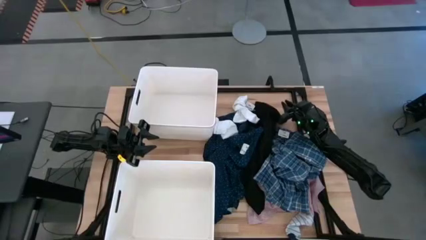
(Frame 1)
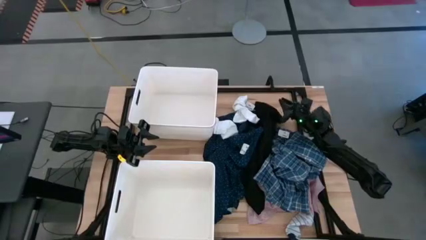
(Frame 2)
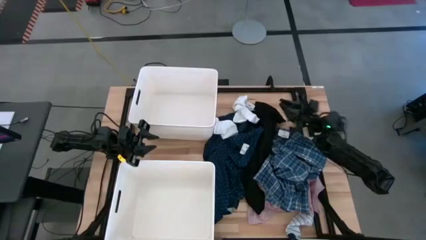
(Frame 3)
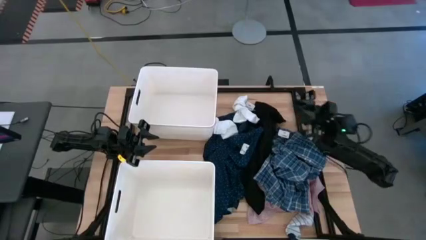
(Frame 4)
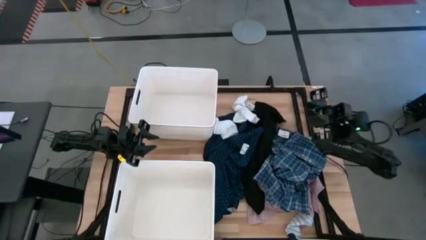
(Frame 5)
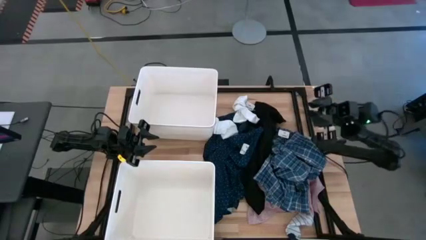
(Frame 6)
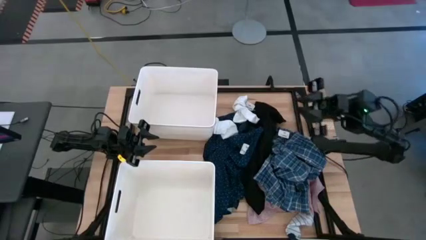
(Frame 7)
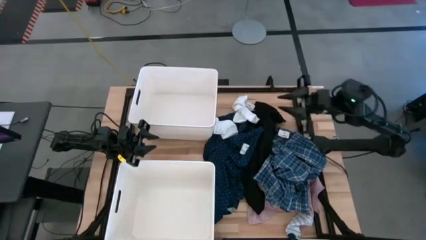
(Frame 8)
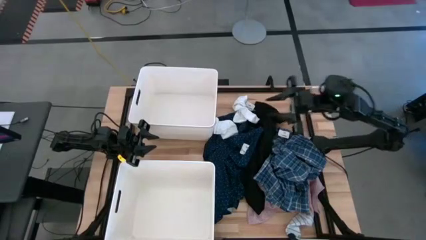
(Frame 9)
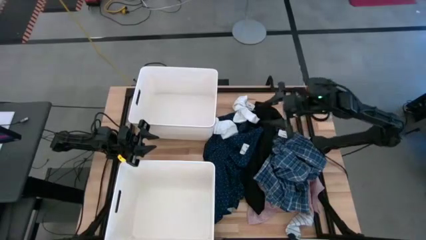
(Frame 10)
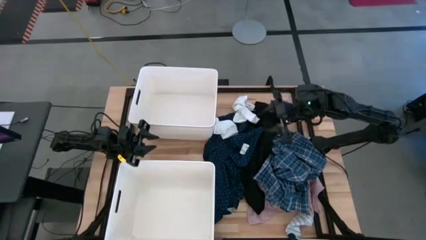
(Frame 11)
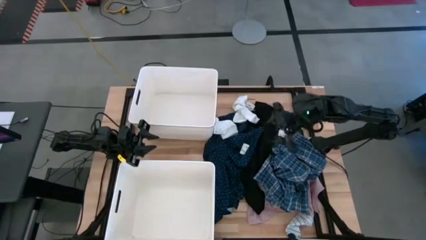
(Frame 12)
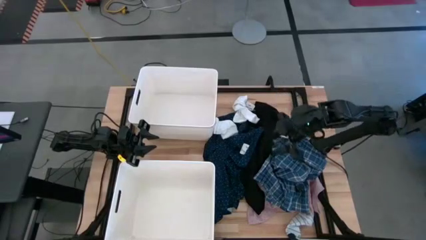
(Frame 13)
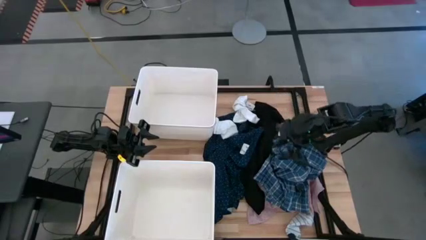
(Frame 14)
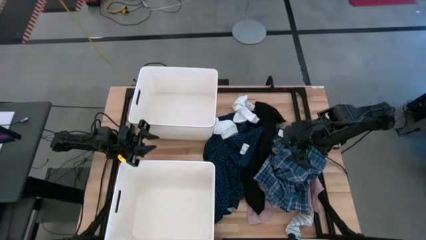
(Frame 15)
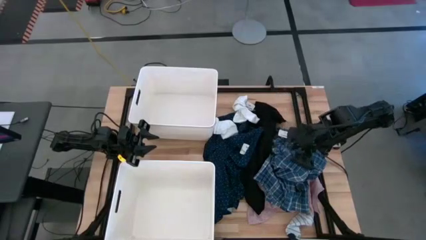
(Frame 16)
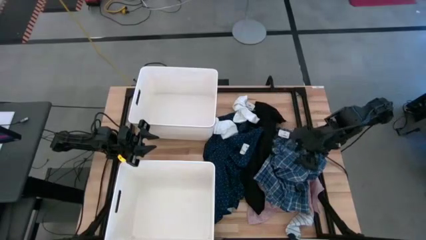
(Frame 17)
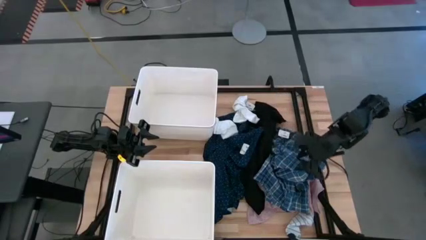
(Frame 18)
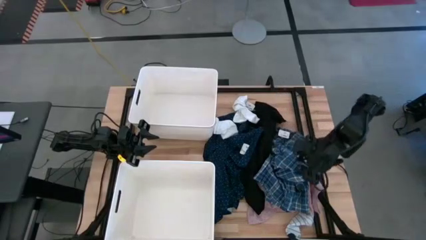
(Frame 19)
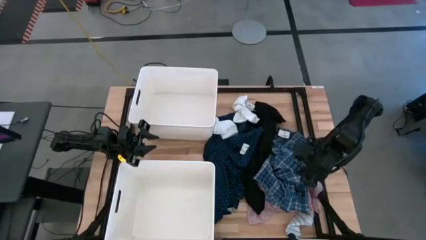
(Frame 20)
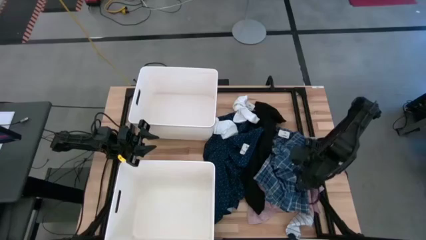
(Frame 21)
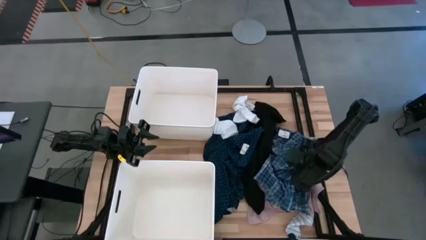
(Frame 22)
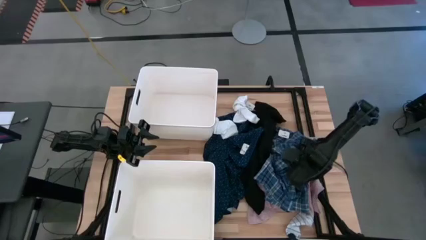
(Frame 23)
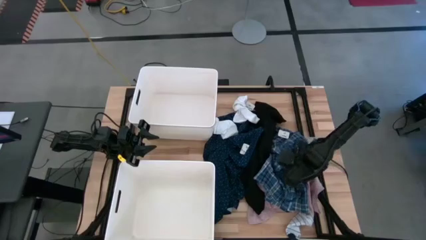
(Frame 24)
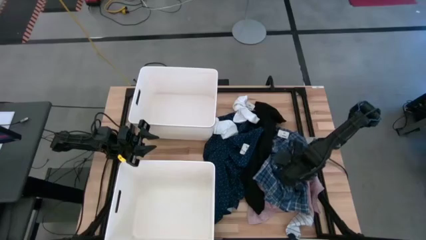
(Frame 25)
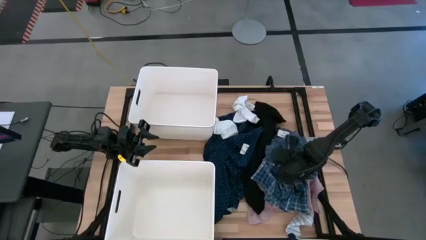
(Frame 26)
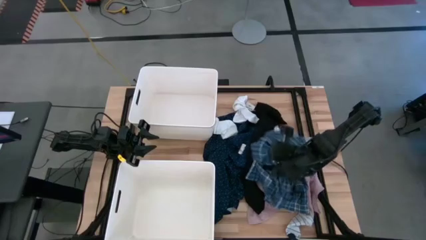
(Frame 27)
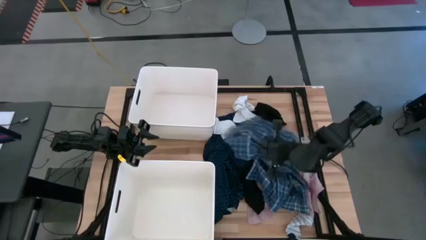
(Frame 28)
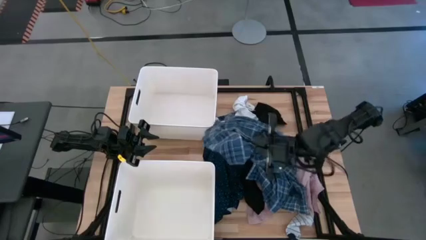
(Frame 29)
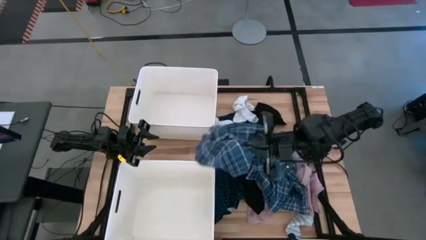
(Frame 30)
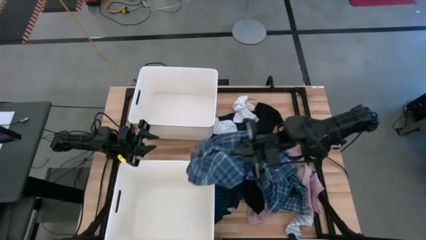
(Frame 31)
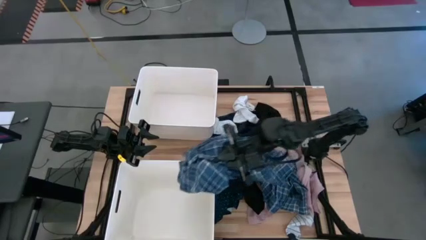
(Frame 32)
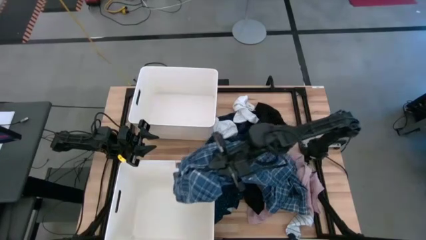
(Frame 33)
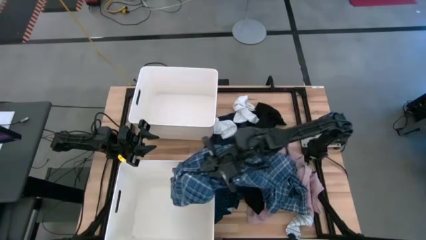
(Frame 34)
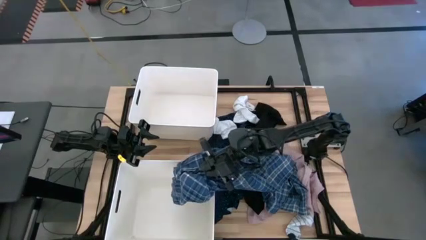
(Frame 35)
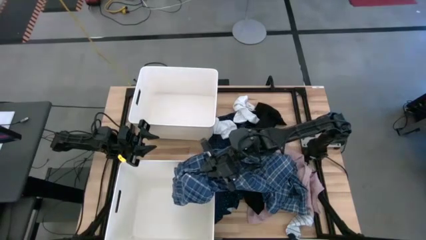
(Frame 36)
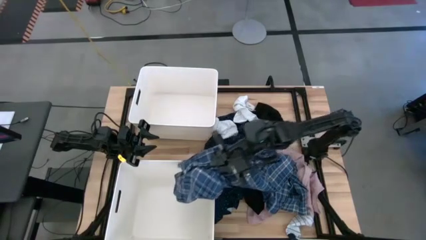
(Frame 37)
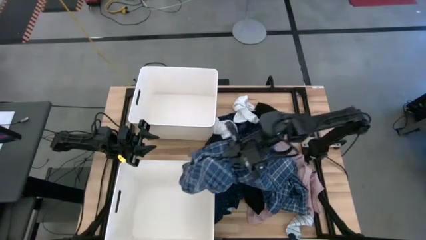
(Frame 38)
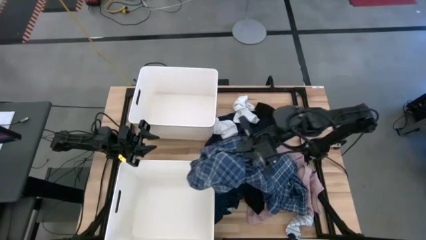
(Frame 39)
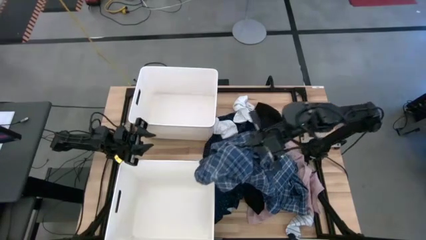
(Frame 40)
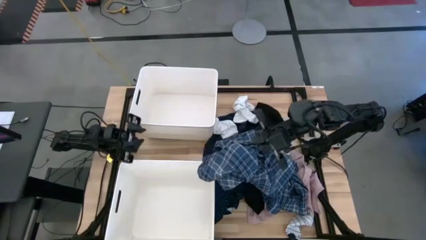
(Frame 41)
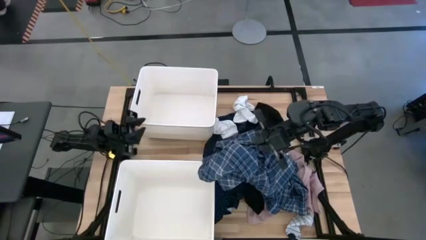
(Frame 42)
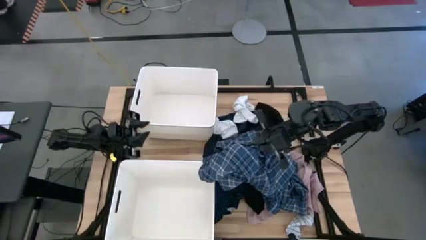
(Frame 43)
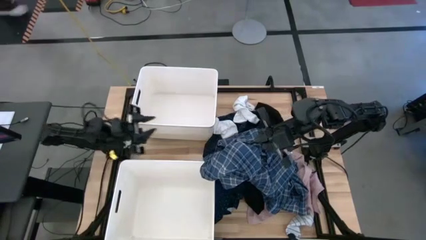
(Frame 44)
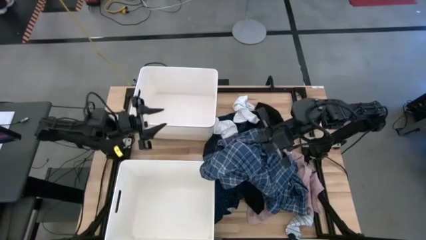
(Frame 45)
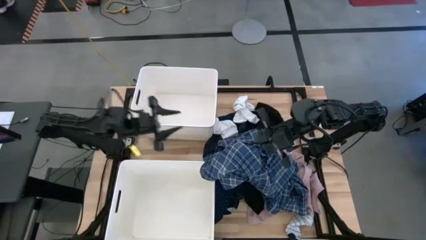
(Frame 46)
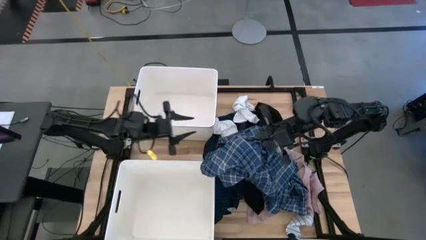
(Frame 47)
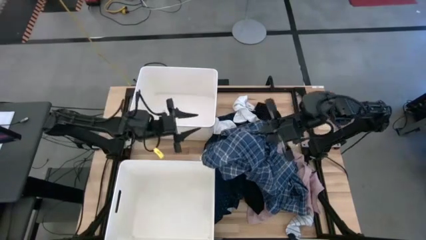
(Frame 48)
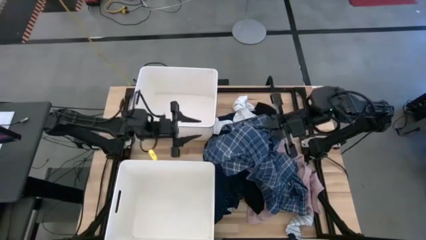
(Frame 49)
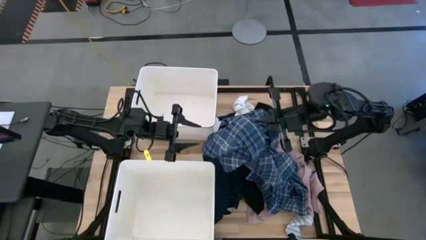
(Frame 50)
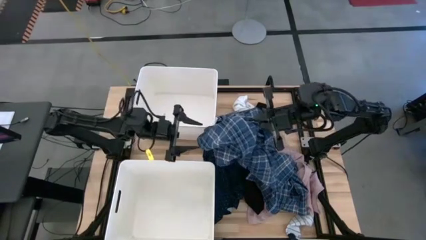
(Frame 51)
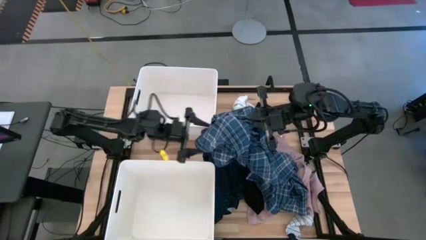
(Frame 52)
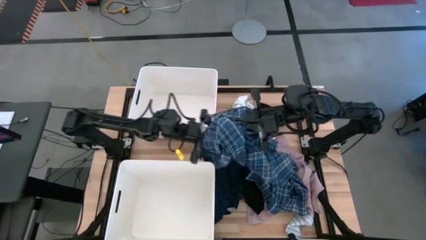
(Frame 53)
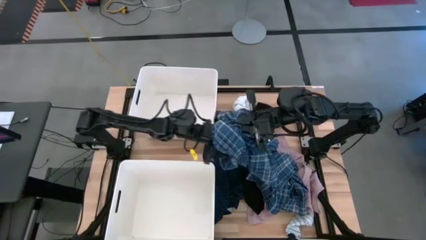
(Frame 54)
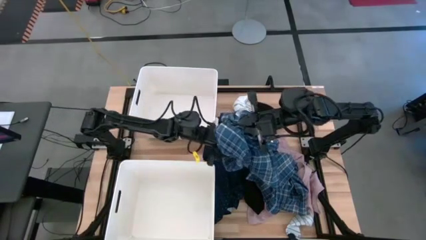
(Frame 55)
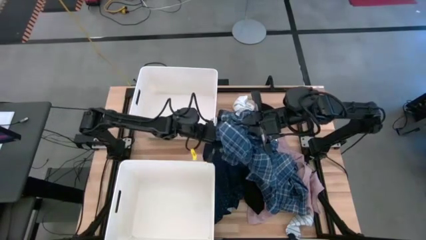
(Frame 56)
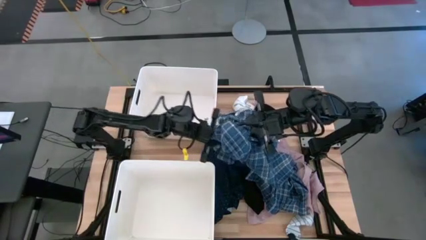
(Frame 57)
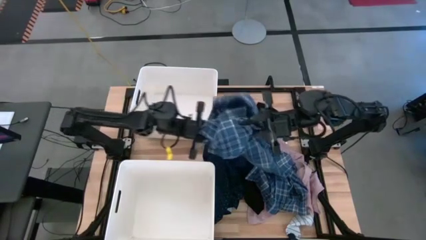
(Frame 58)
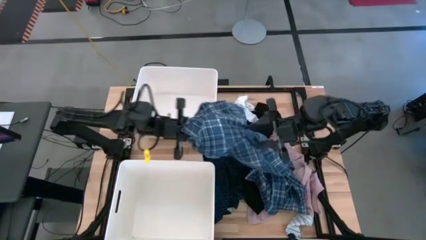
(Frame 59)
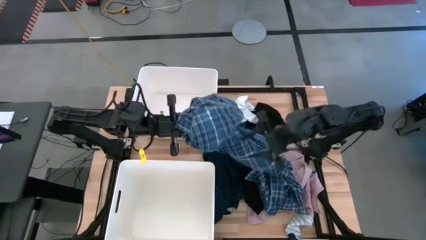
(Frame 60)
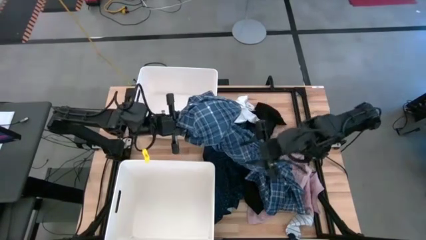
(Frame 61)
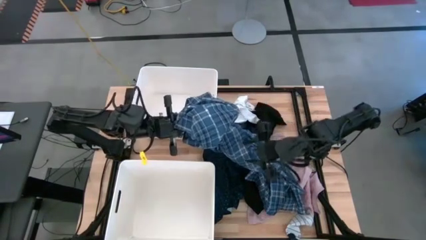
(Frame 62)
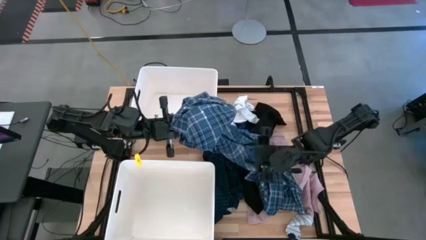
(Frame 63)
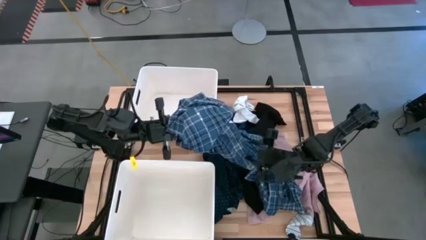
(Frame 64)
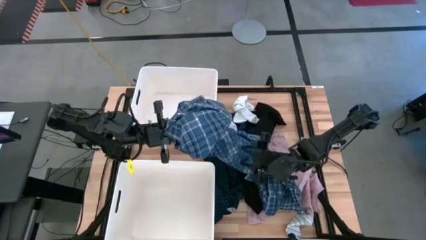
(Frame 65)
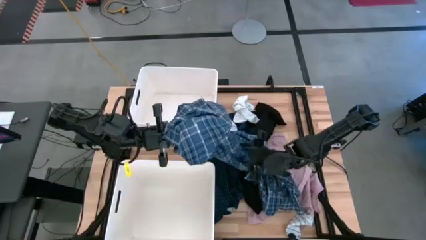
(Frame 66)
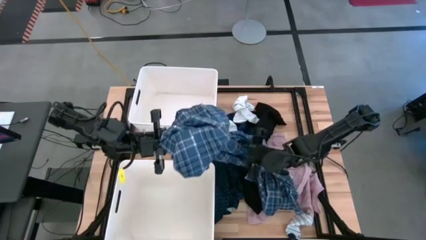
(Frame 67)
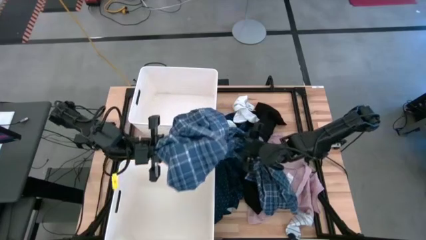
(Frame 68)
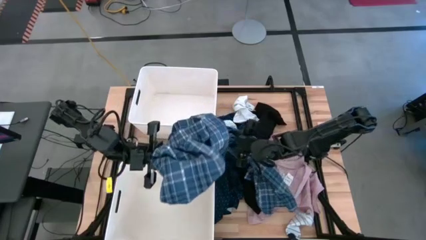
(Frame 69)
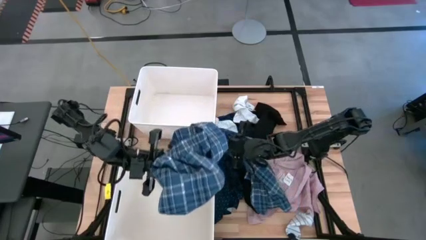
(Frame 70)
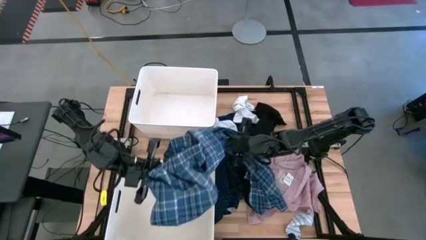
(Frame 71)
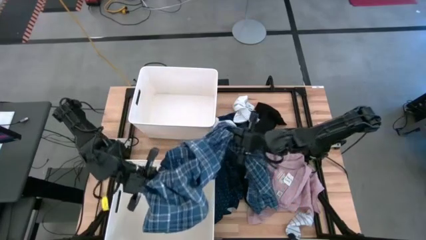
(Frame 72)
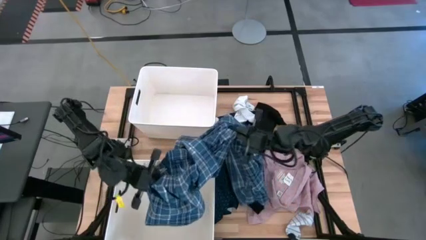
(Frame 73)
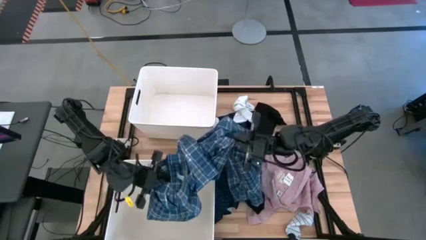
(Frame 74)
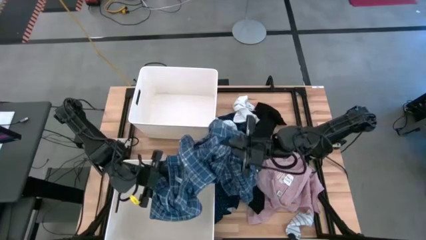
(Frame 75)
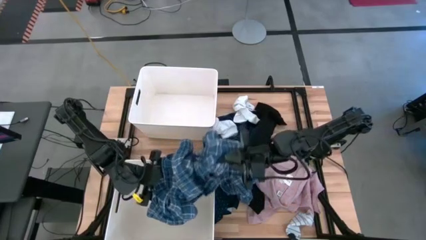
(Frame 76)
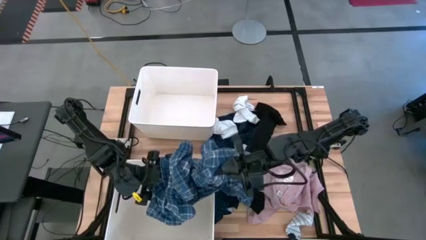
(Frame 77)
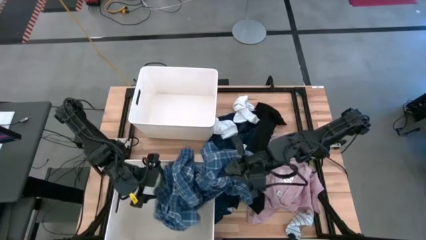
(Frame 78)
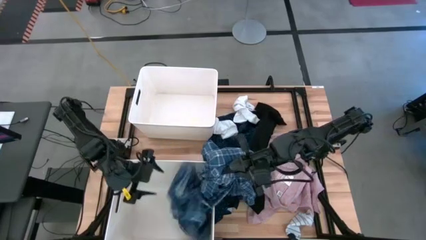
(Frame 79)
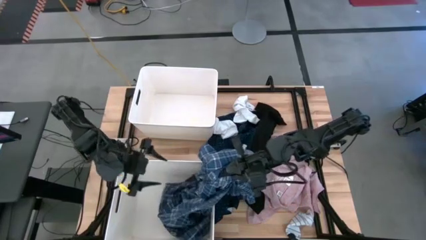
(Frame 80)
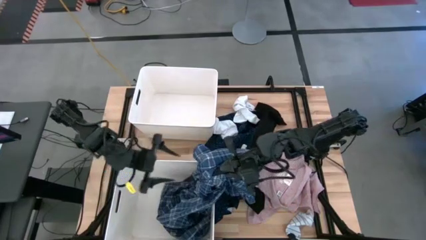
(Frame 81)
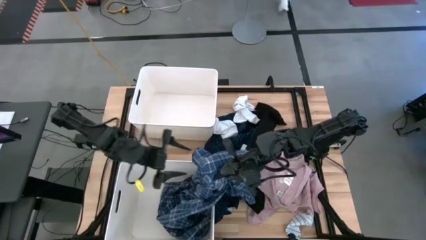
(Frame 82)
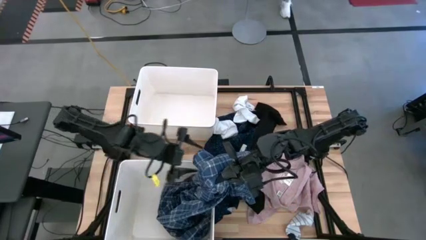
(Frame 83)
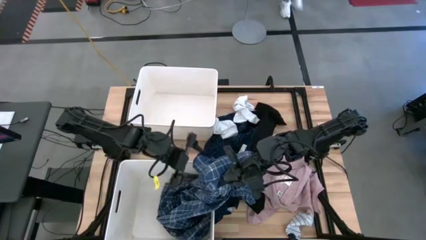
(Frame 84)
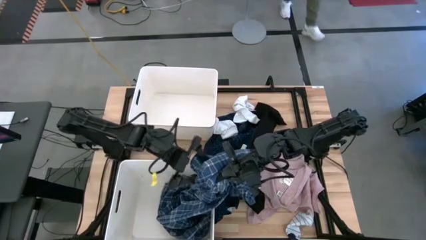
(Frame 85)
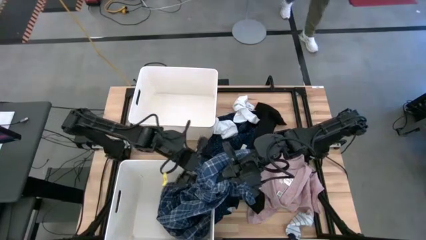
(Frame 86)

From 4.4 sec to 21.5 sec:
Task: Sort clothes
Put the blue pants into the bottom white laundry organizer
